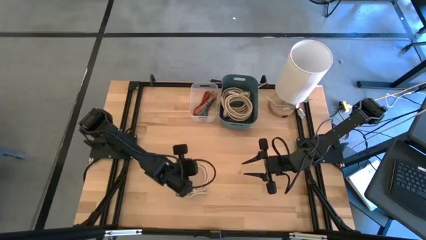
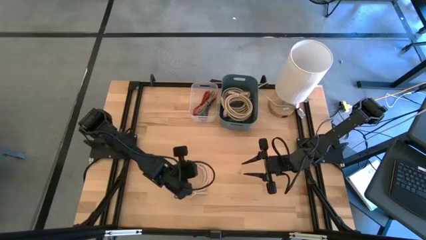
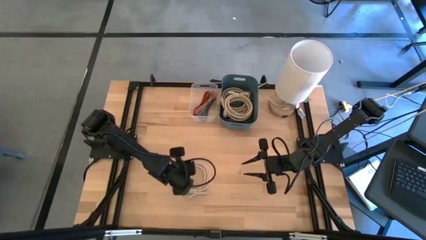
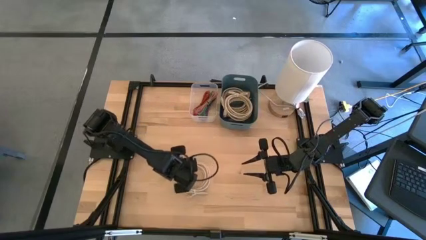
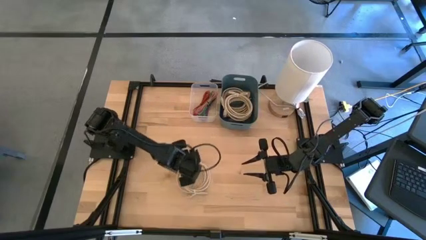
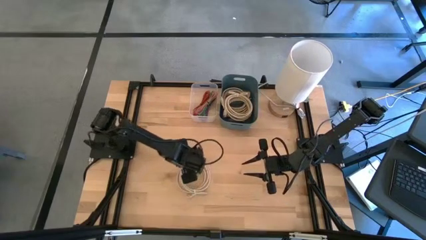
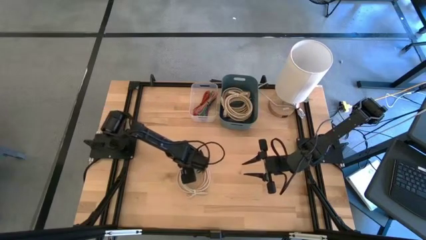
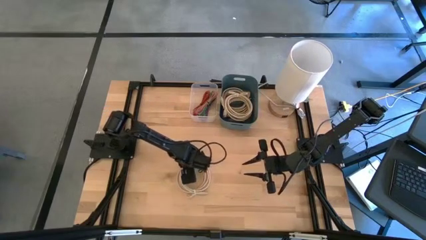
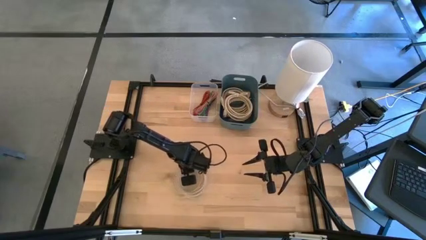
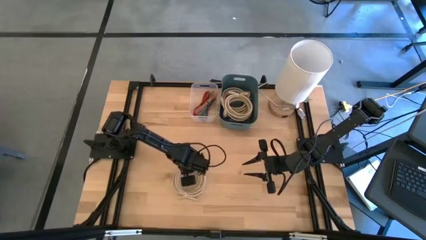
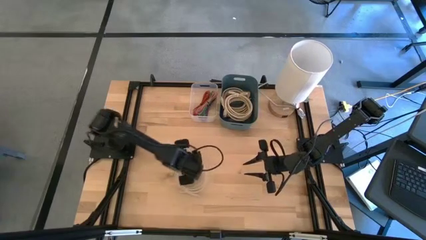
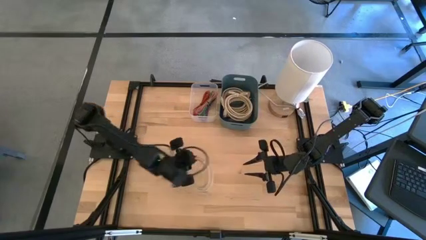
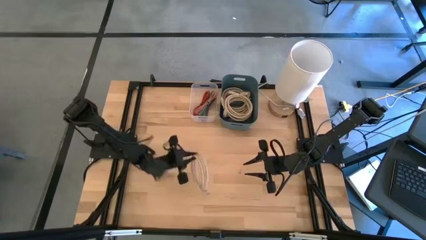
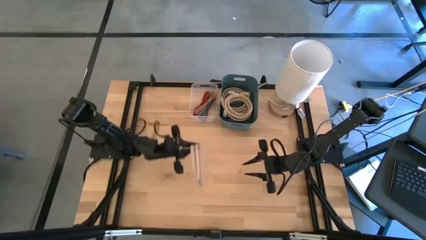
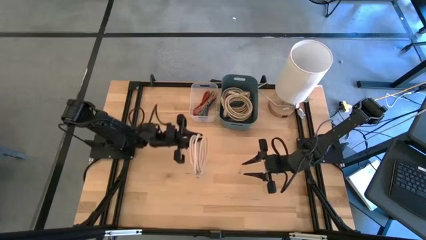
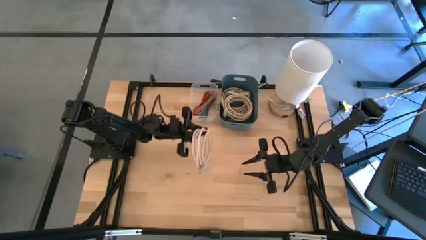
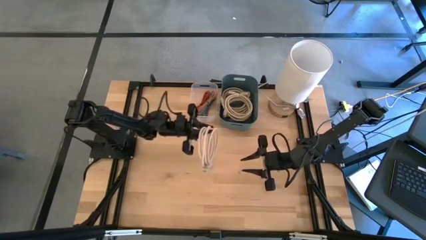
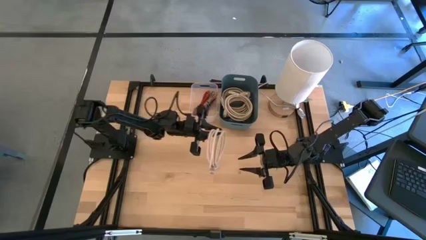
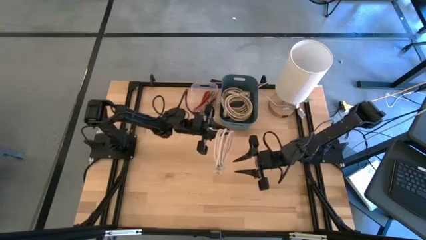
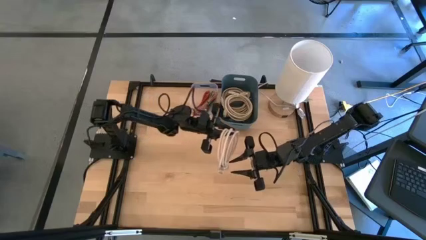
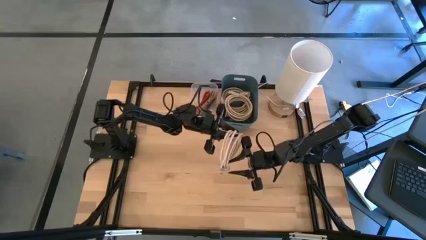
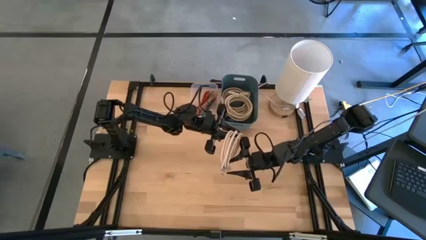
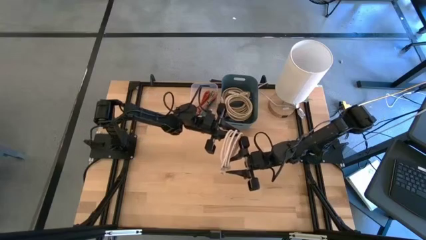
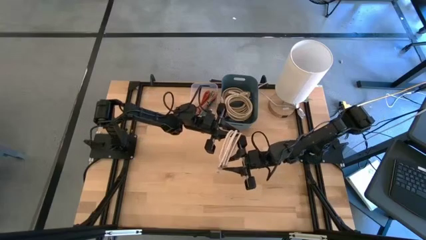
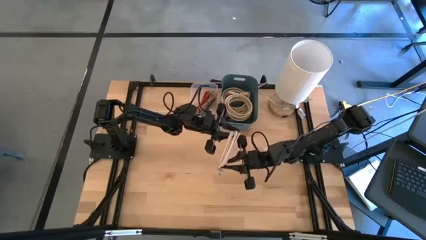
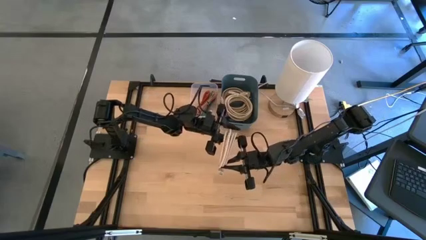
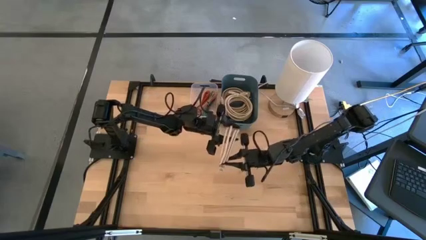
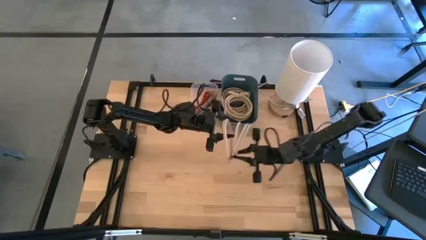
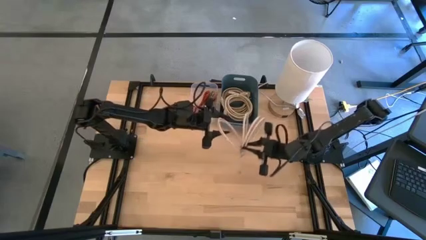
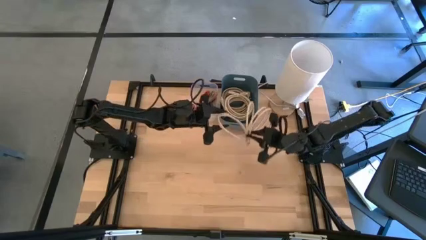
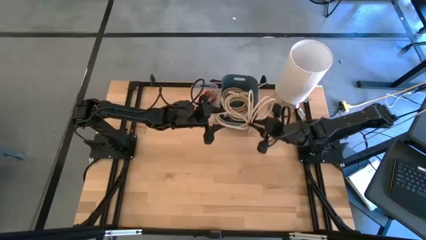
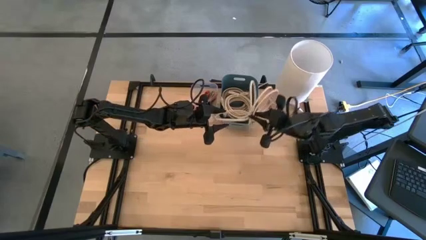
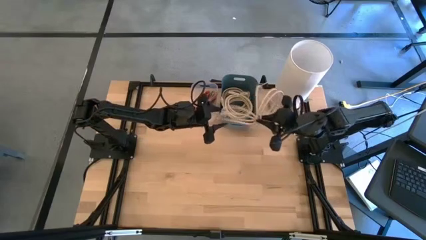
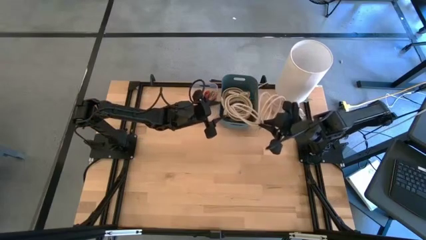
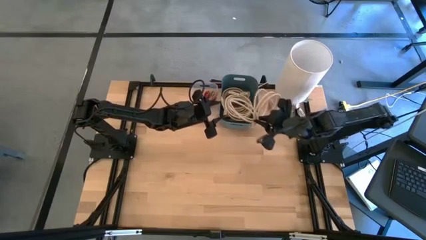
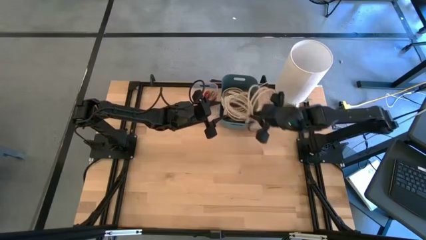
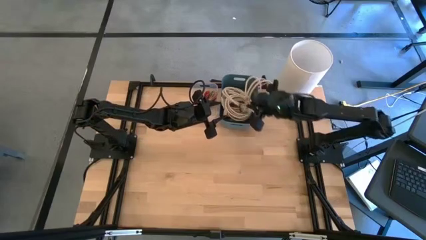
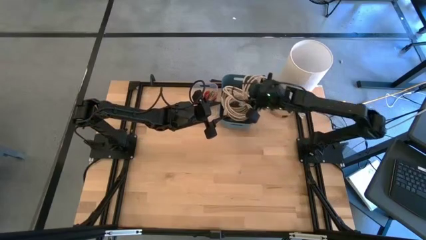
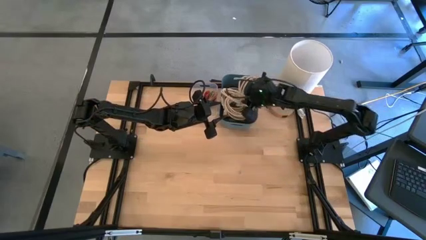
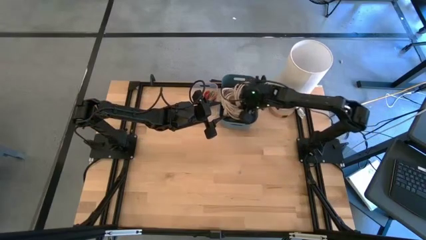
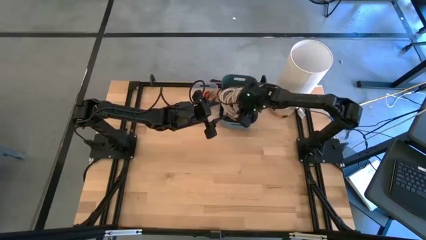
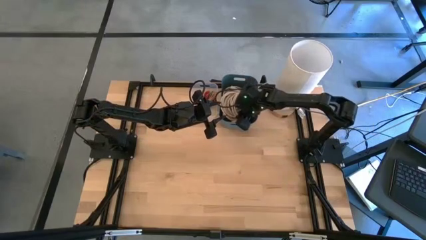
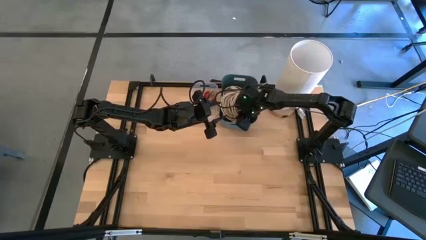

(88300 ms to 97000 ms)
Task: Pick and place USB-C Cables
Put the white HDMI cable into the blue bin

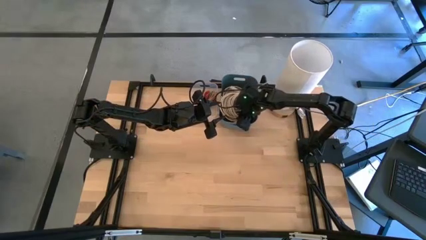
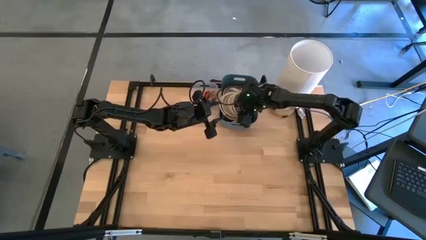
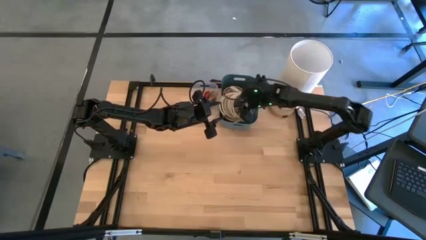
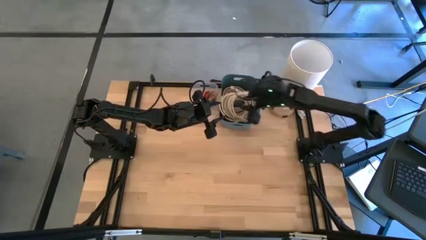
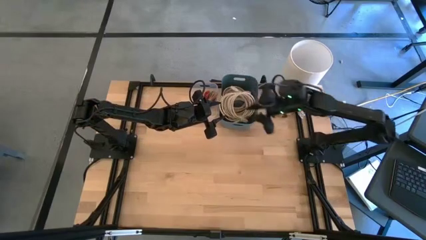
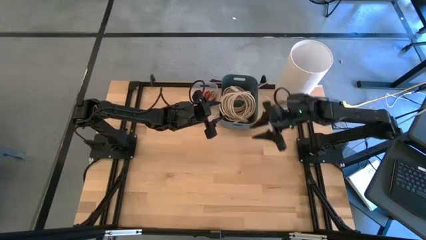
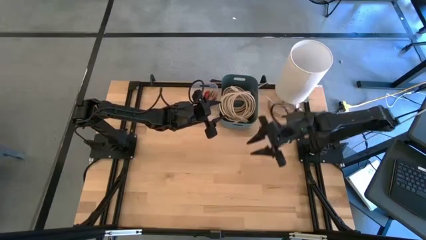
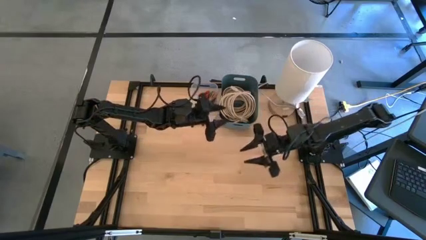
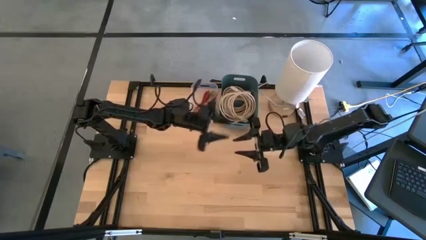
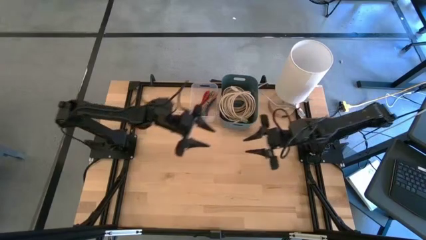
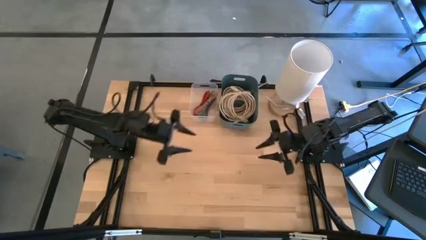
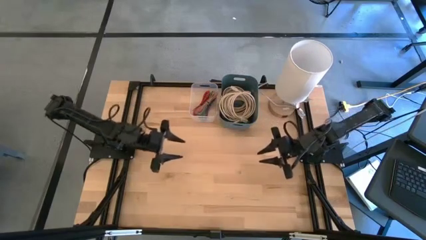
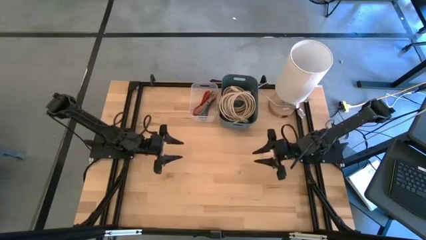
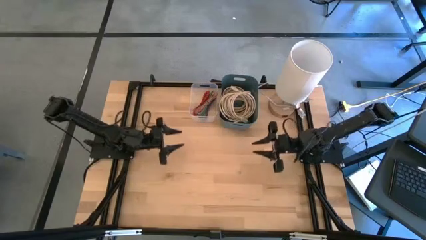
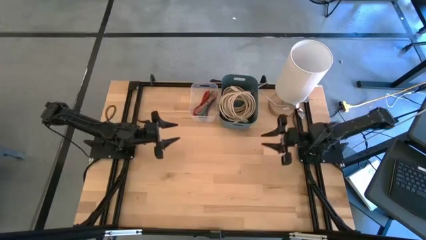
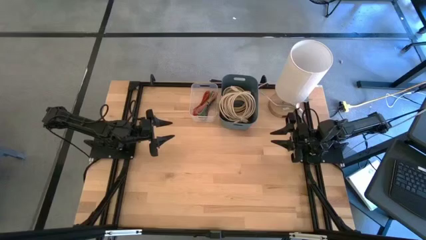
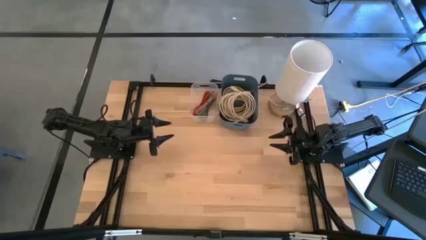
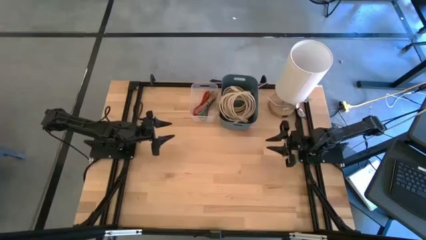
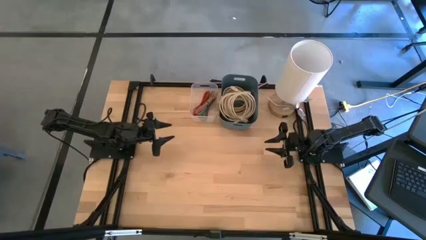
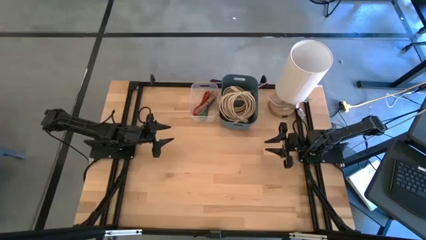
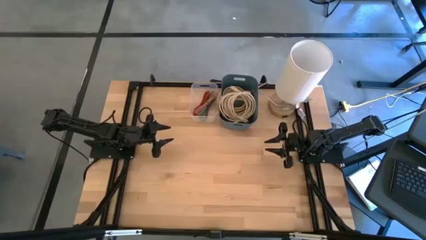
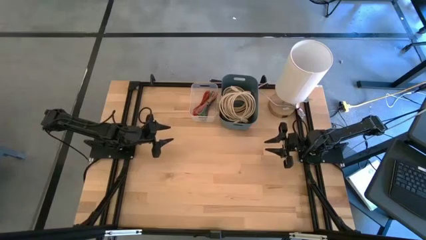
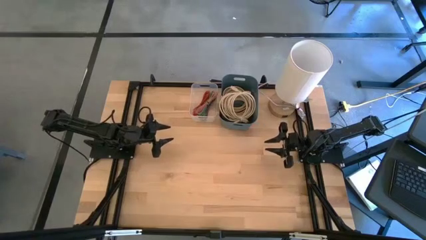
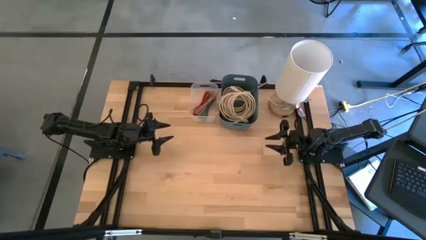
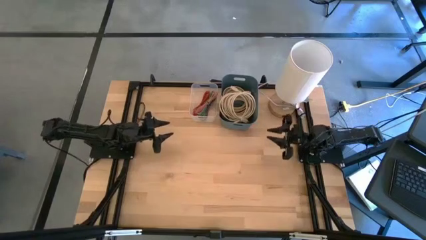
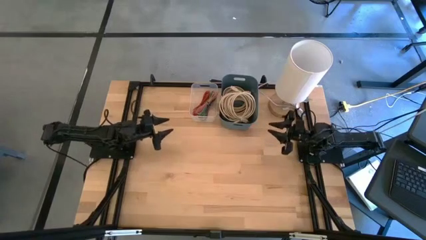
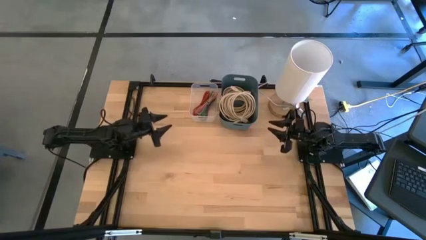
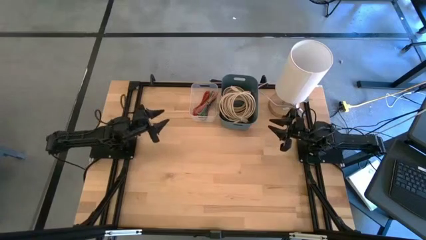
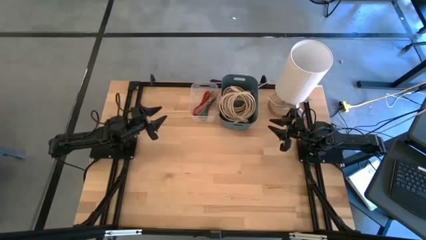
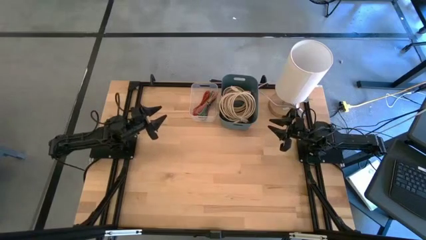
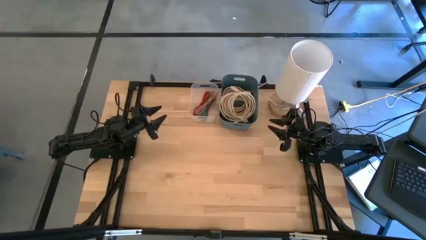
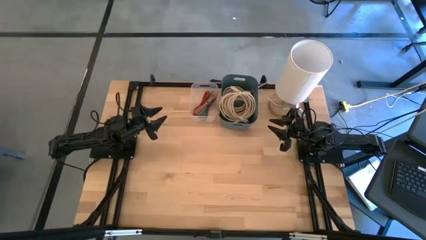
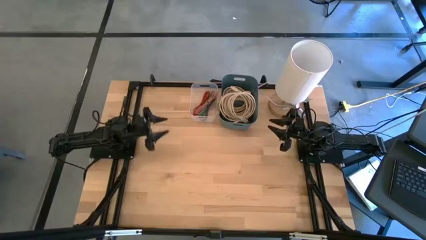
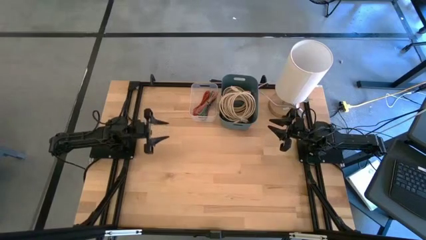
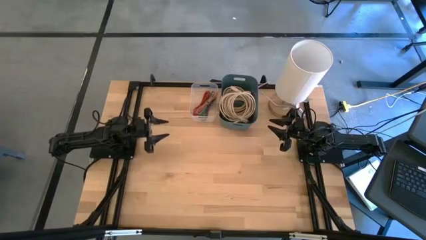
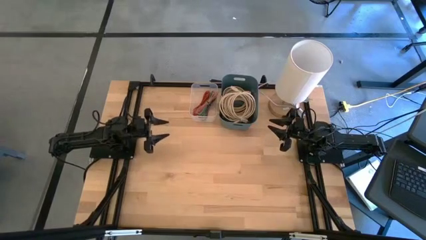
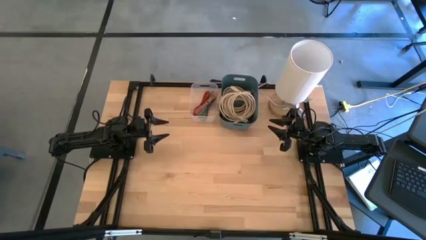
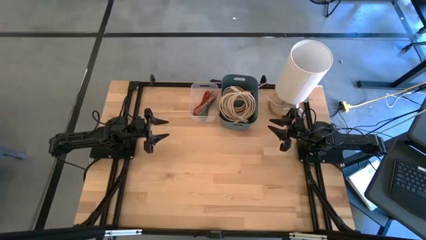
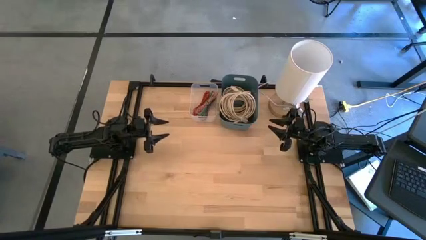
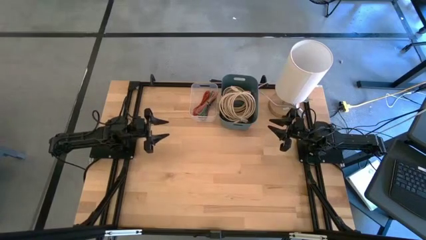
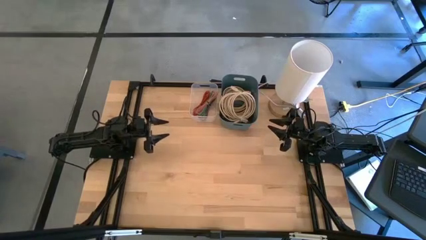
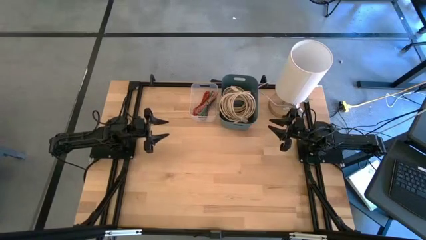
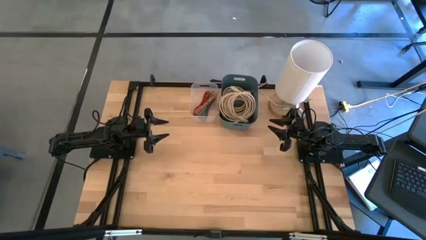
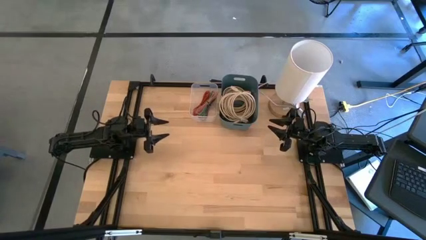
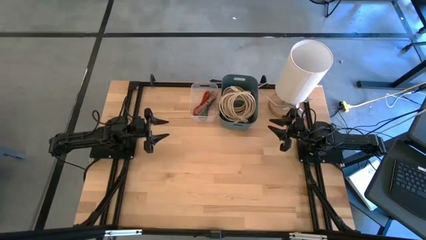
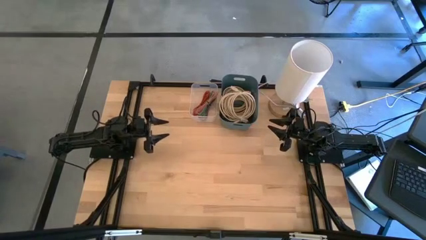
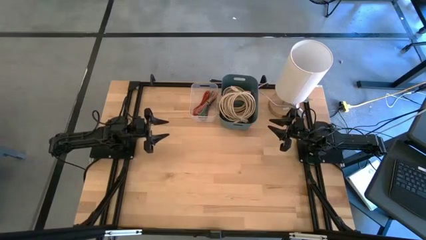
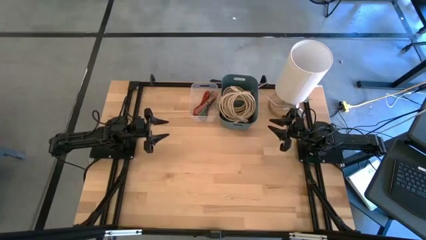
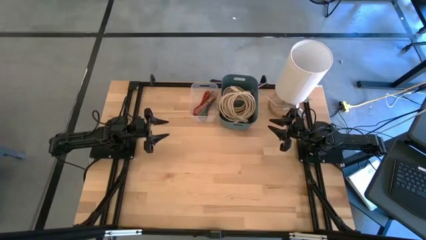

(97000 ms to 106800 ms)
Return to Home Position
